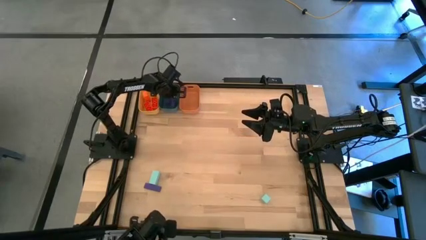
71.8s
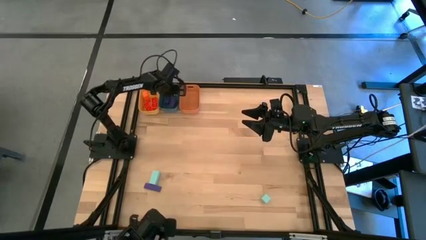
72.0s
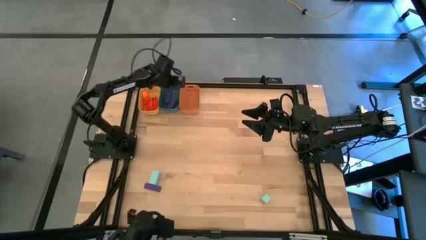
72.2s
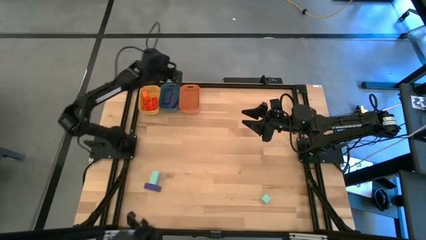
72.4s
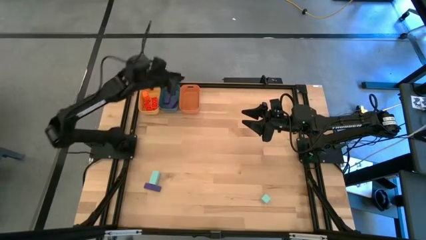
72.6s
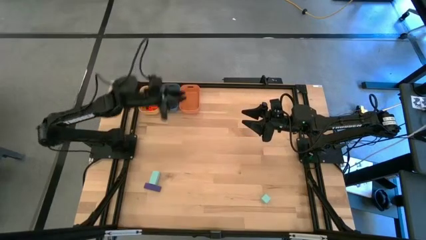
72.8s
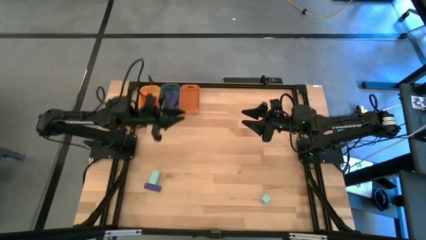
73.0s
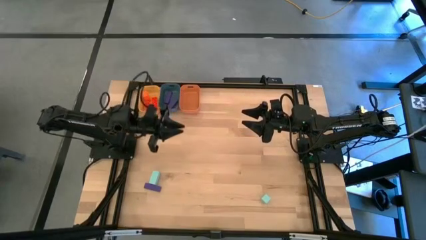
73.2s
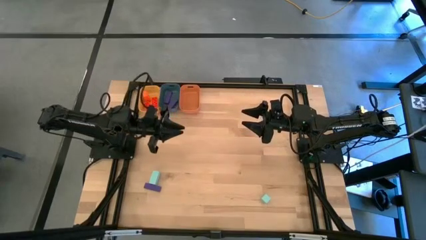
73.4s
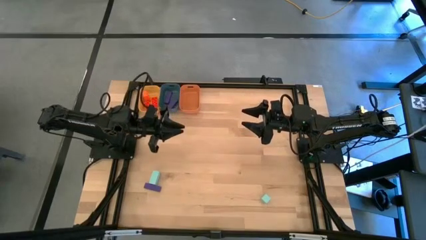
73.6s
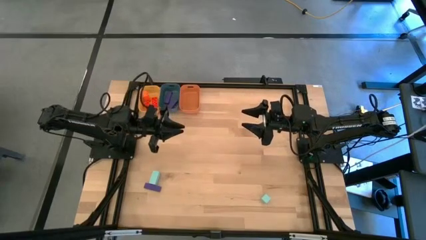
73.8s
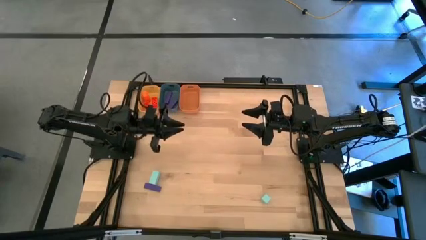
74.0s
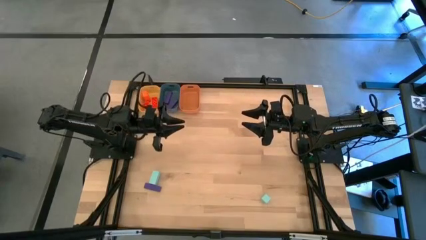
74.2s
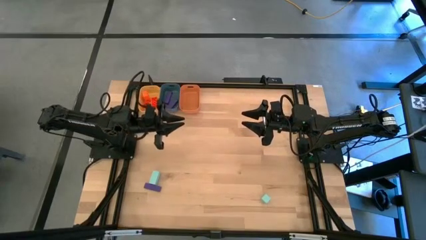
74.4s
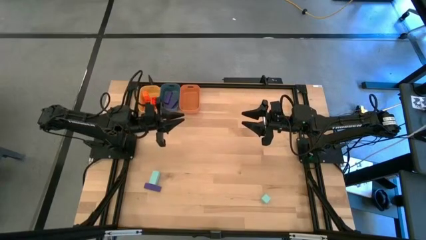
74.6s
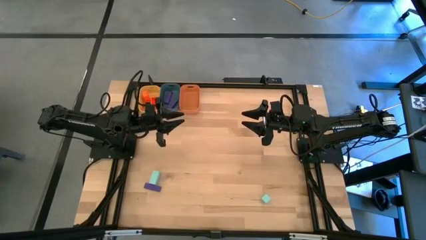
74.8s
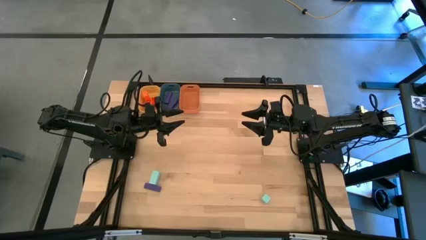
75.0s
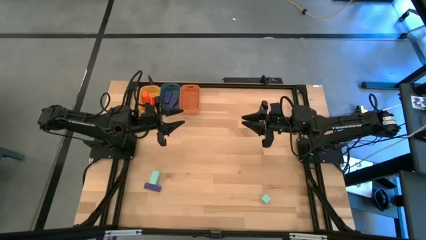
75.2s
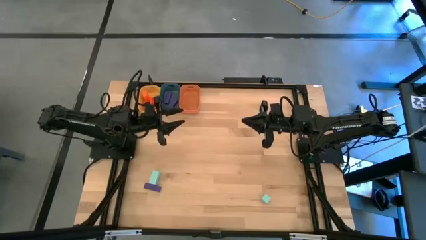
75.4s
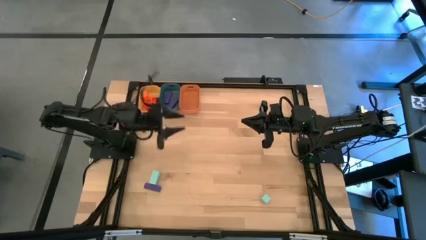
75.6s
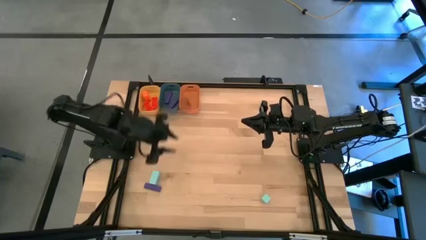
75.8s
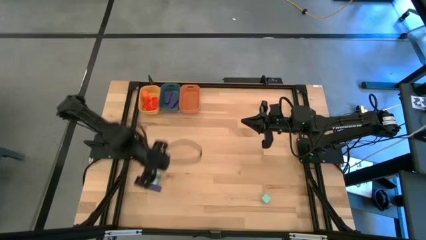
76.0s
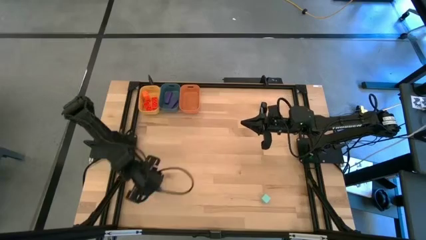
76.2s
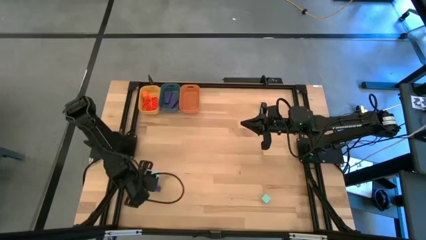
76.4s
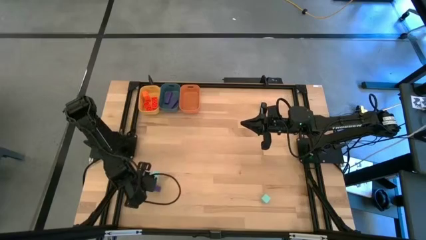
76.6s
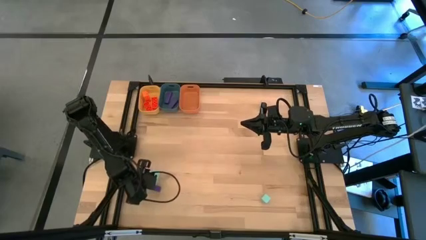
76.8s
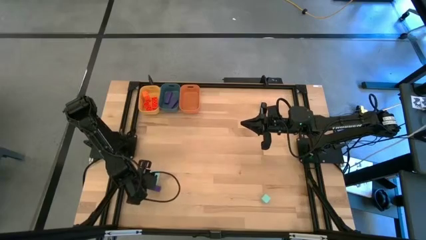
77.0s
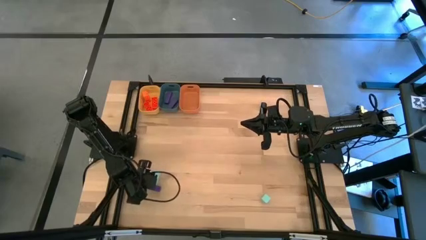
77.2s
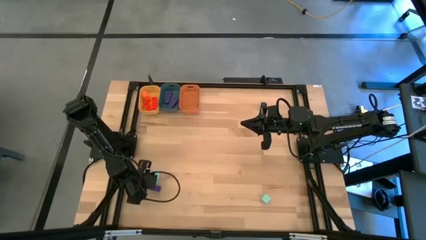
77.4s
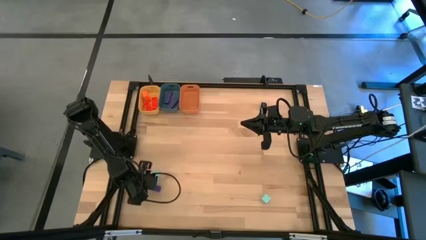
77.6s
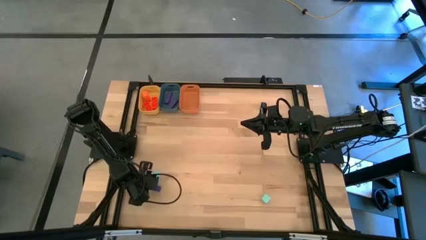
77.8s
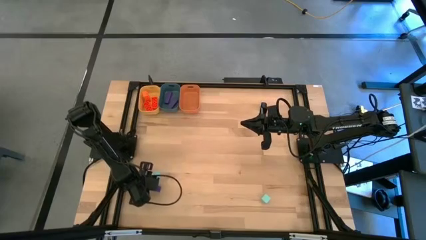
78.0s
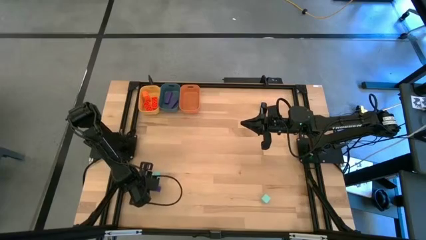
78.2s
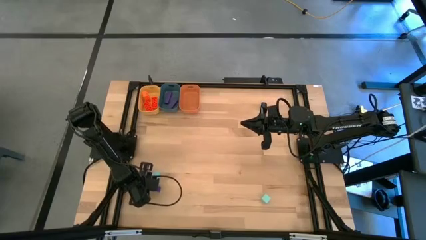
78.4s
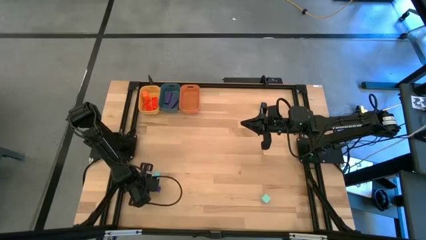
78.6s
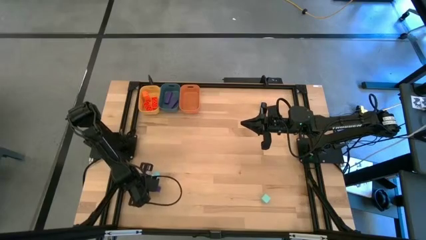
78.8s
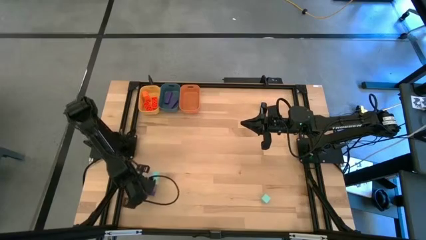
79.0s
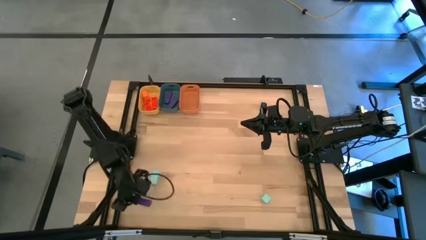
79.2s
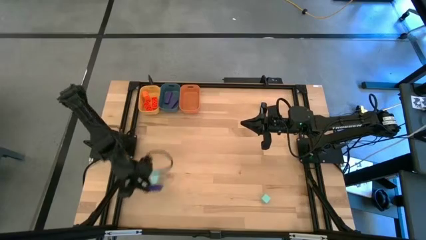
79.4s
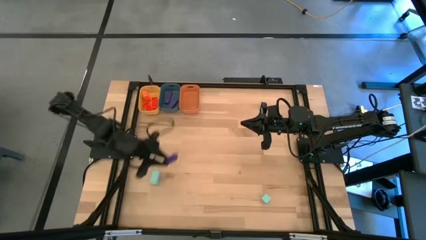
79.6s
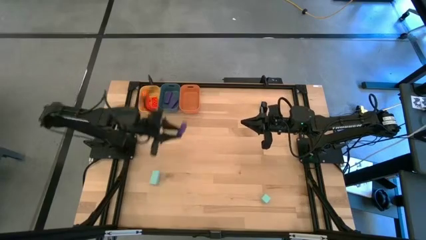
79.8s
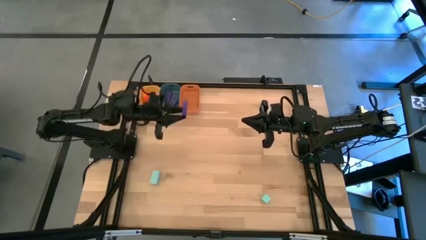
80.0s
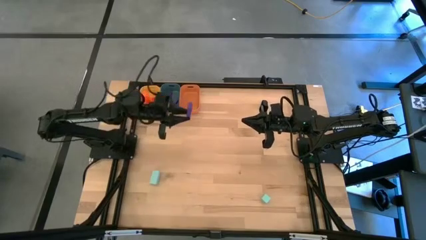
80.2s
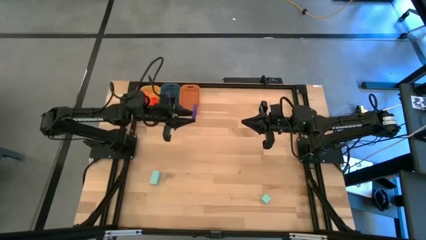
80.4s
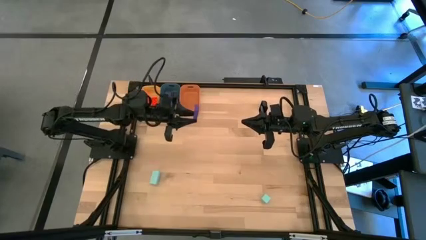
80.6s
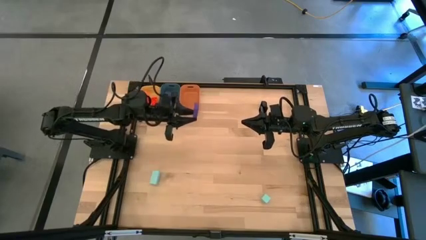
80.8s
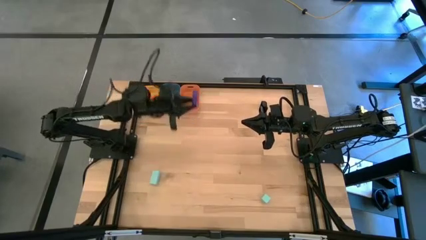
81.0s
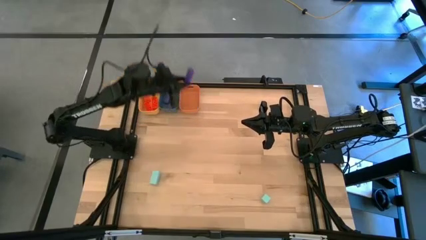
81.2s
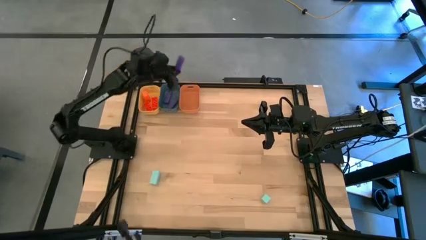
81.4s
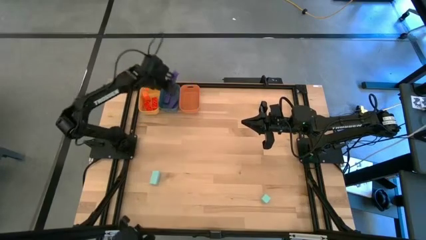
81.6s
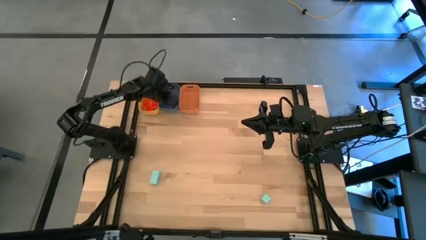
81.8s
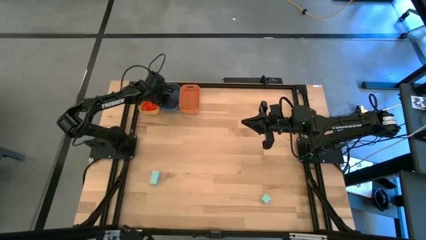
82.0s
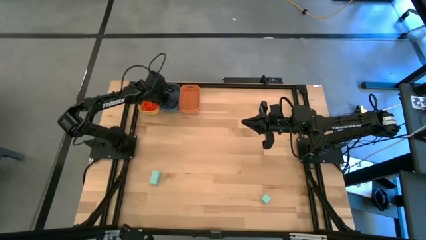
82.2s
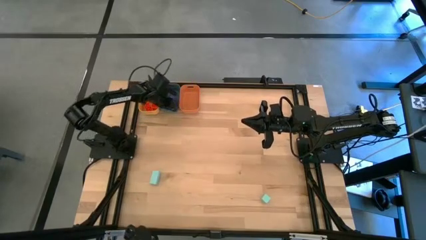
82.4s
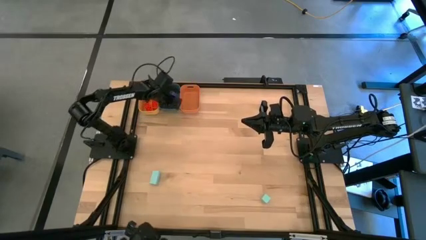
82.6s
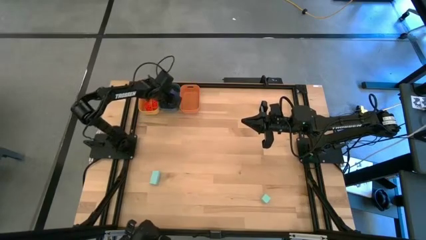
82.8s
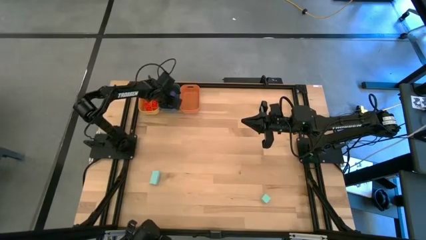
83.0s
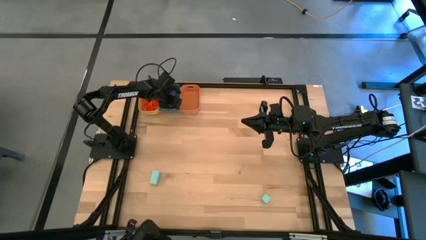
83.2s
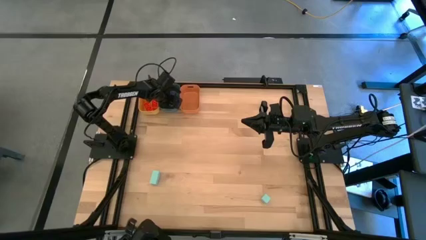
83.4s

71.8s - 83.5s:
Task: Sort & place blocks by color
Put the violet block into the blue bin

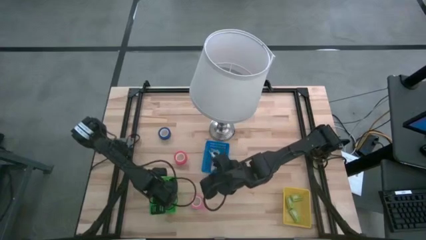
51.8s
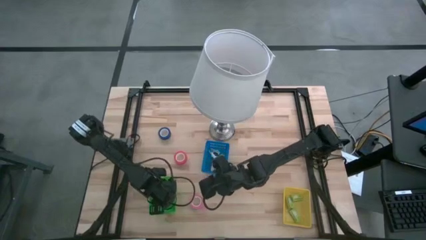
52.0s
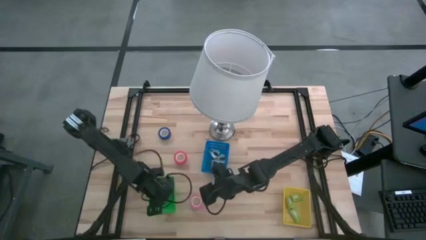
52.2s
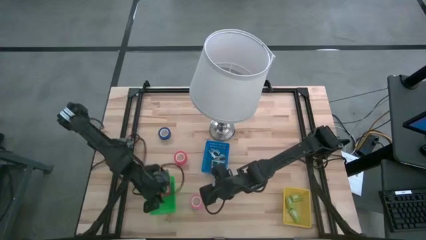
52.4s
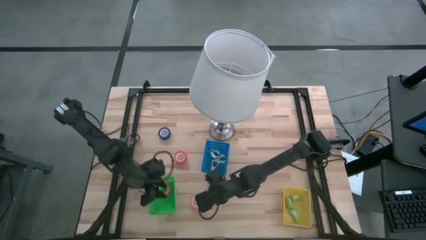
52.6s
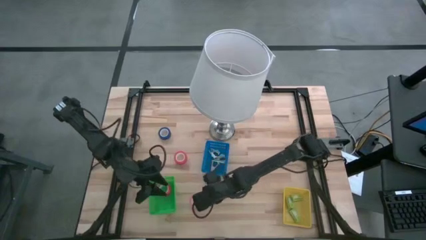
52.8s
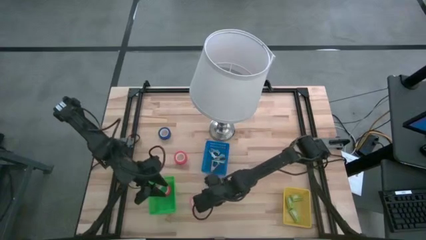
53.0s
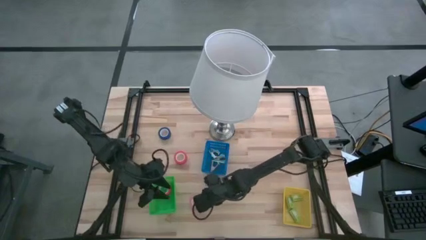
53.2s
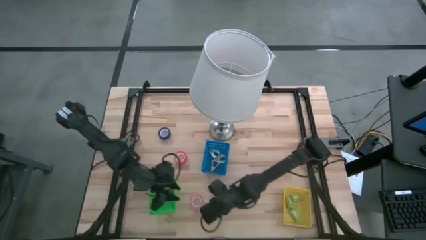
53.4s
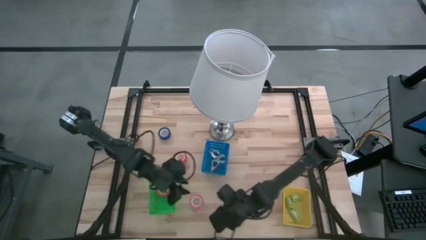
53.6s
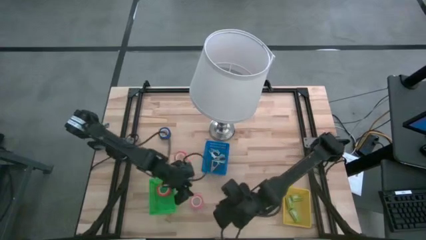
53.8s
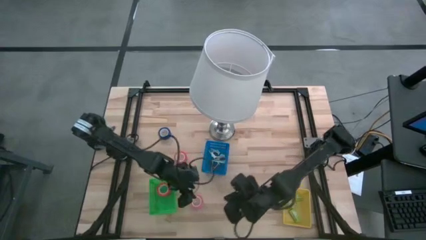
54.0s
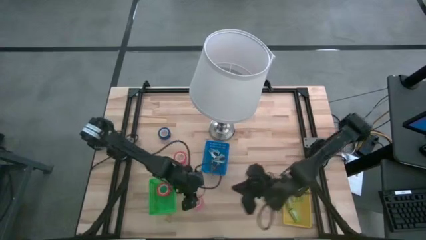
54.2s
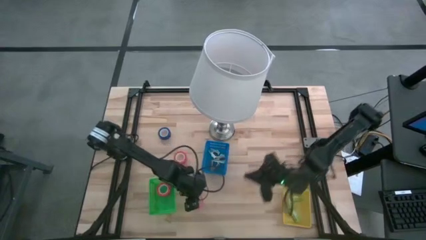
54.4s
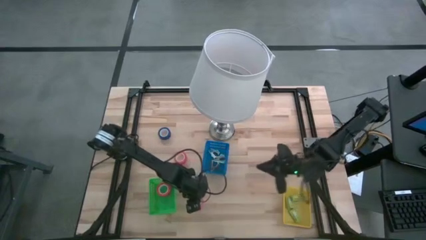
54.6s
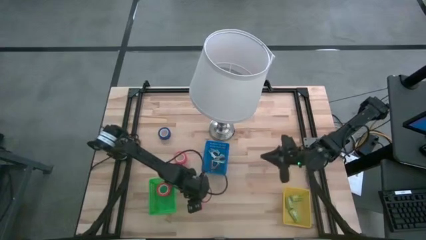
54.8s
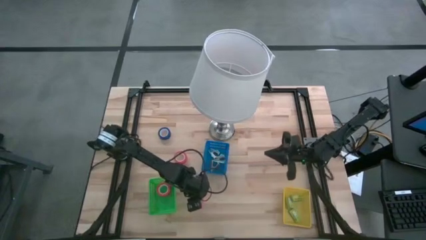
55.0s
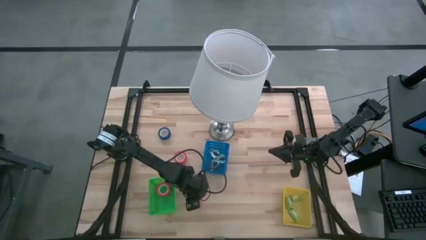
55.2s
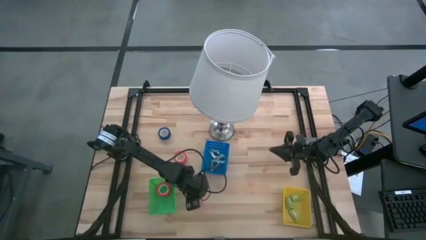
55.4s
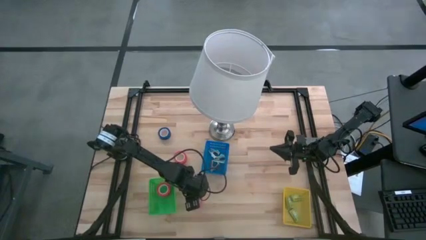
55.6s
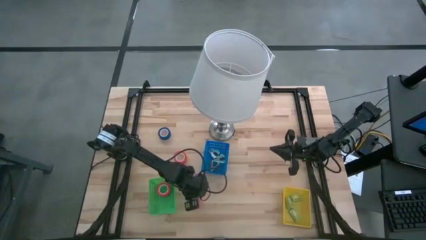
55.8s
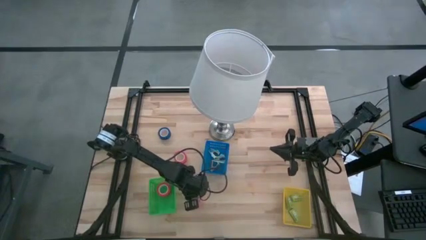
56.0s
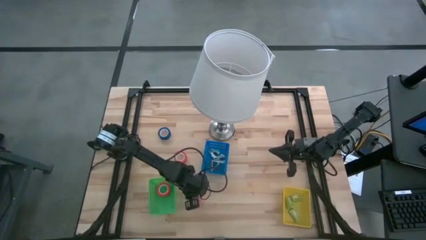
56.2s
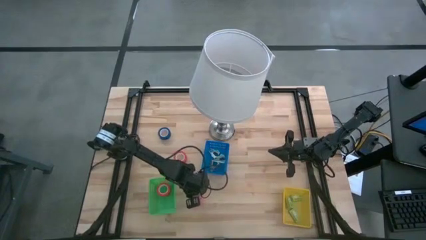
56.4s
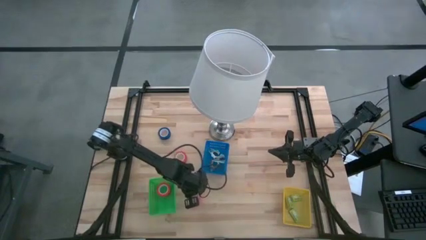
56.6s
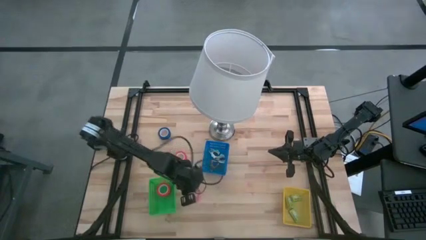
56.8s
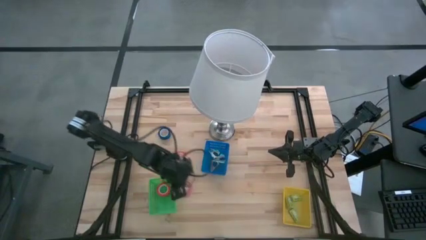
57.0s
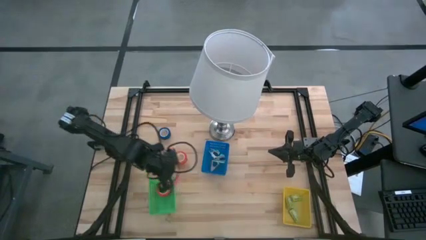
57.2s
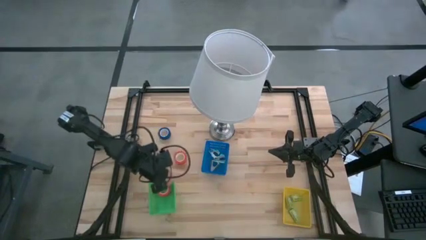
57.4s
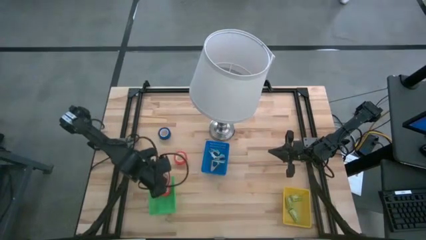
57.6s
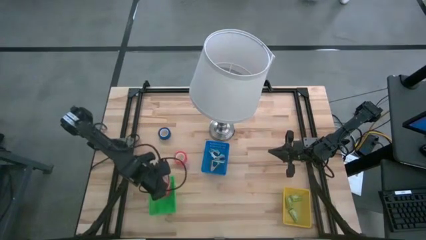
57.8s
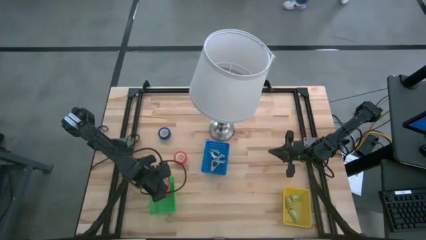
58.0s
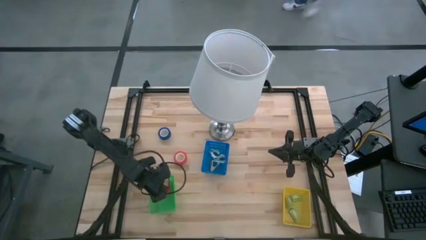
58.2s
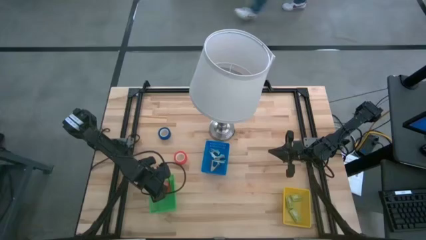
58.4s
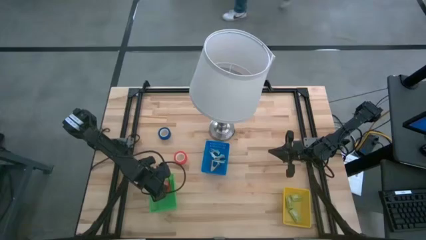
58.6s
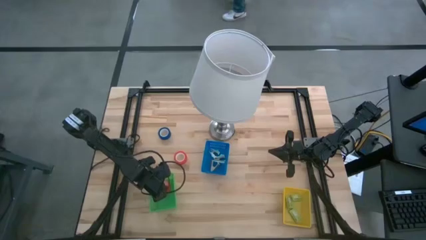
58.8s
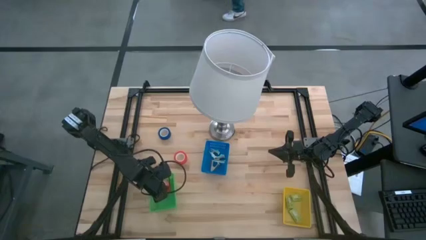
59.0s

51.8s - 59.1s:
Task: Pick and place Stapler, Stapler remover, tape
Put the pink tape into the green bin
